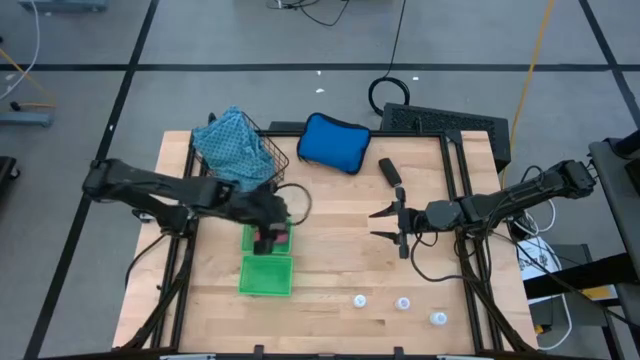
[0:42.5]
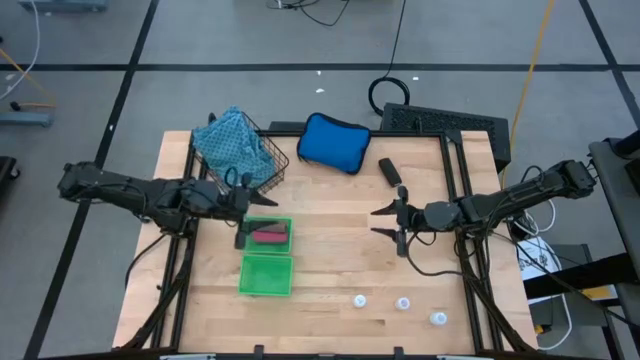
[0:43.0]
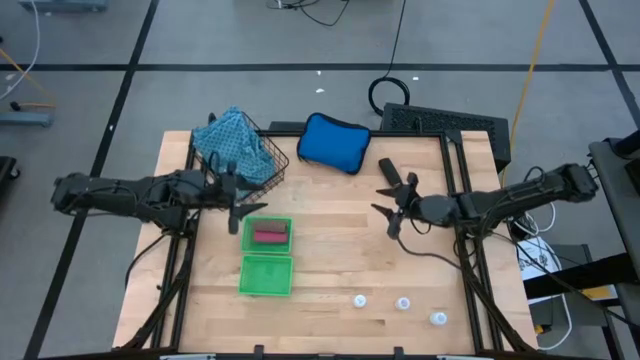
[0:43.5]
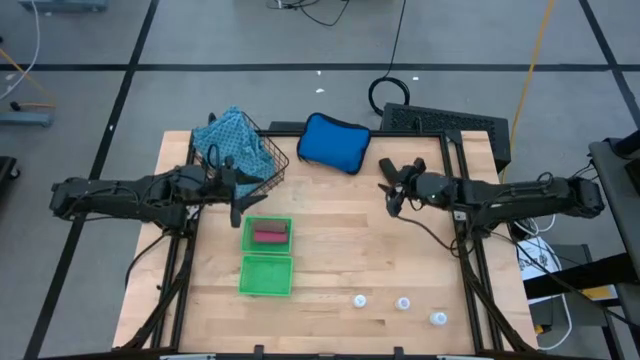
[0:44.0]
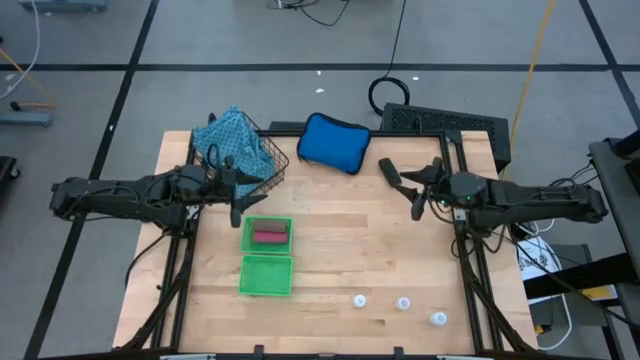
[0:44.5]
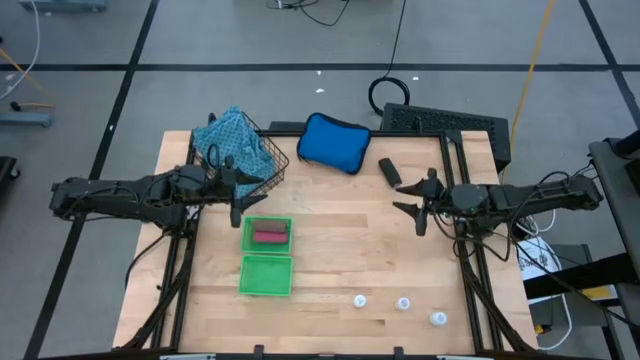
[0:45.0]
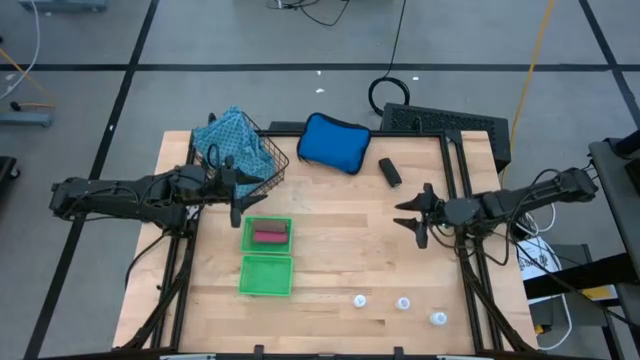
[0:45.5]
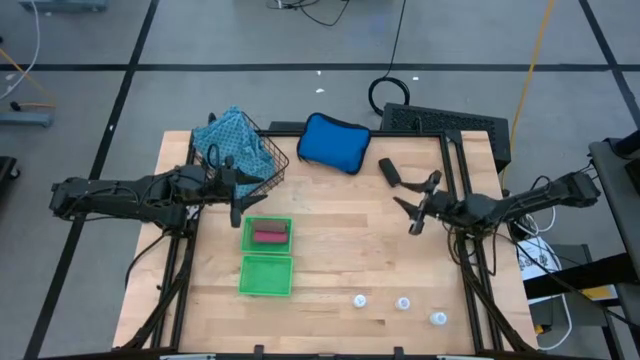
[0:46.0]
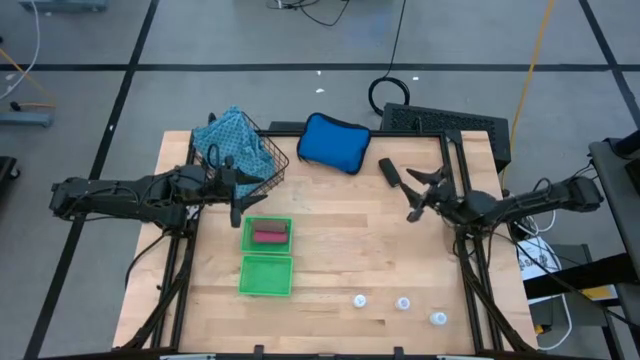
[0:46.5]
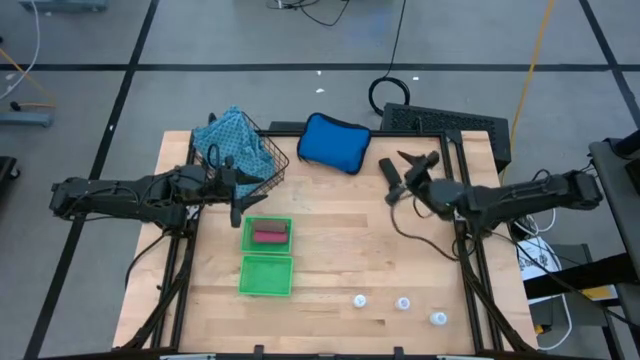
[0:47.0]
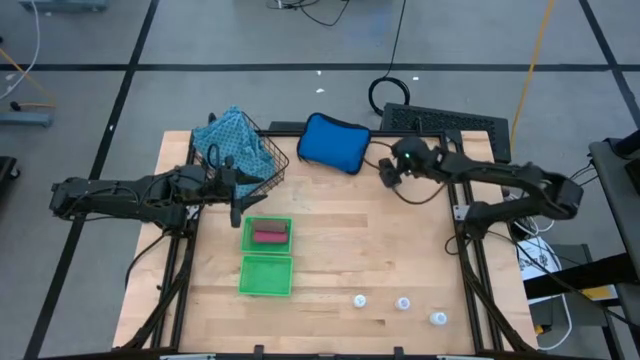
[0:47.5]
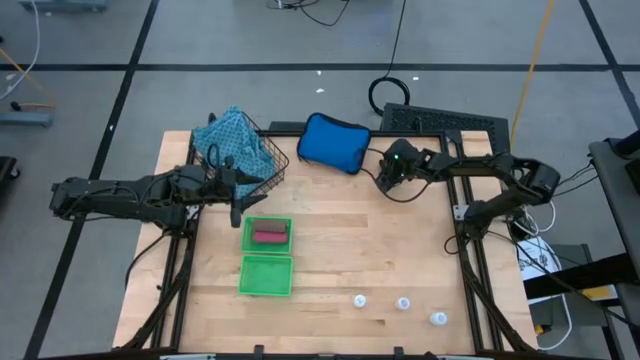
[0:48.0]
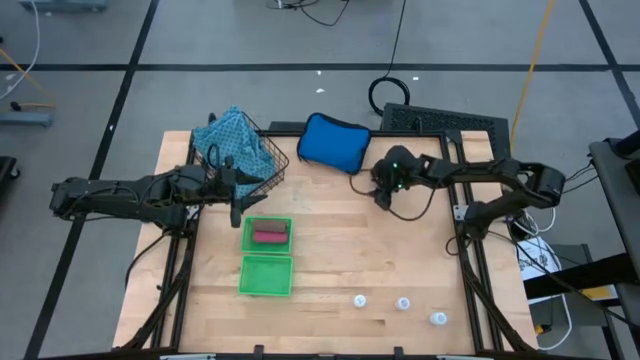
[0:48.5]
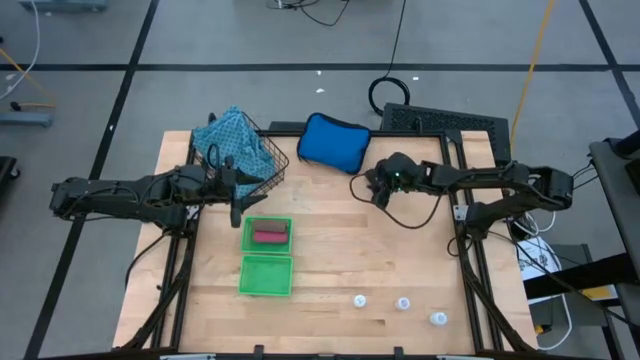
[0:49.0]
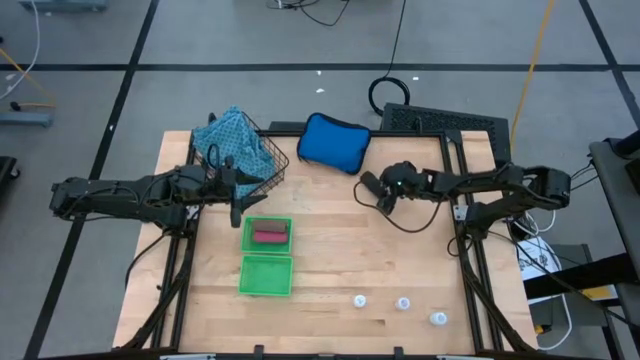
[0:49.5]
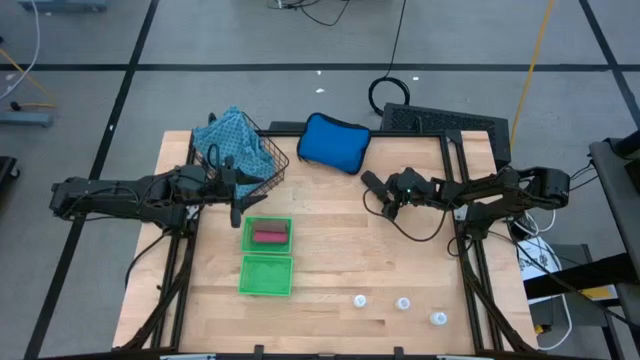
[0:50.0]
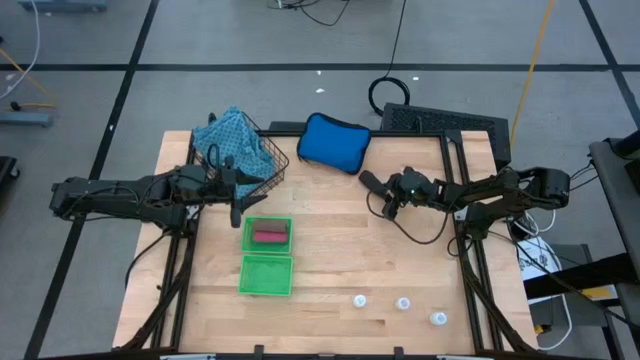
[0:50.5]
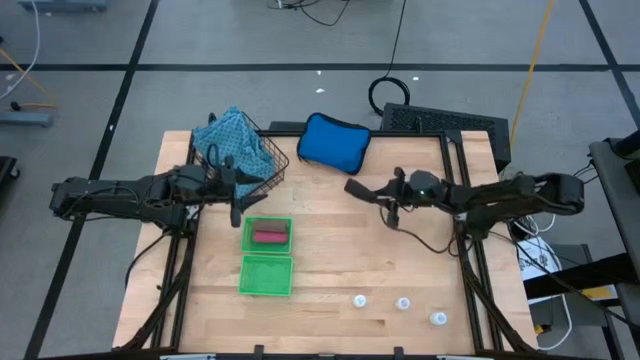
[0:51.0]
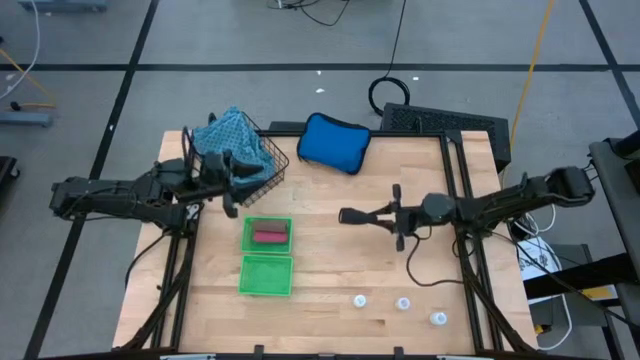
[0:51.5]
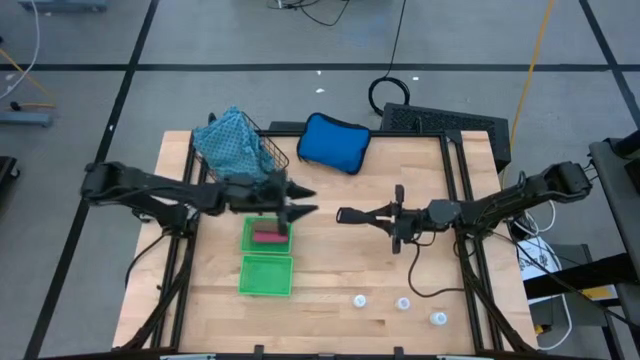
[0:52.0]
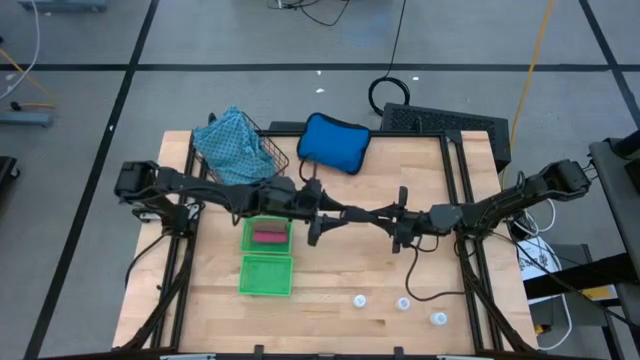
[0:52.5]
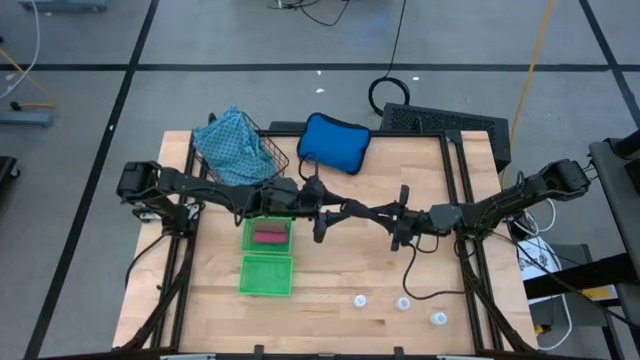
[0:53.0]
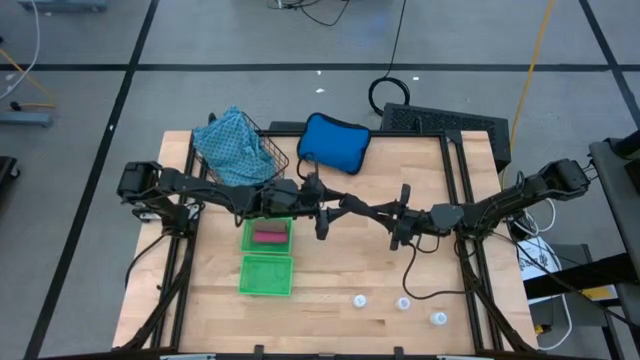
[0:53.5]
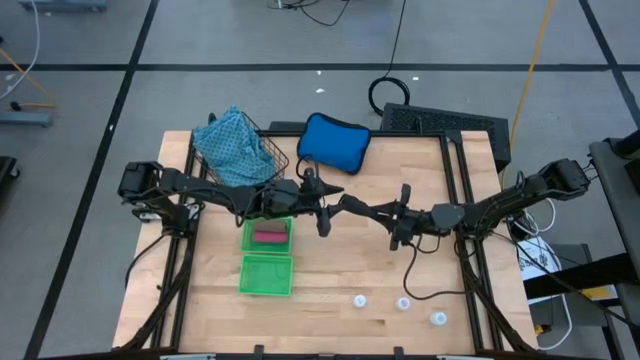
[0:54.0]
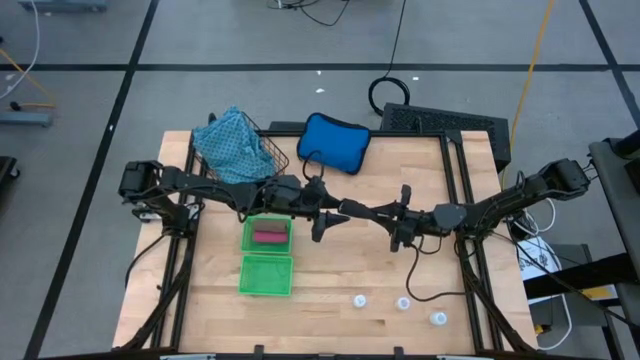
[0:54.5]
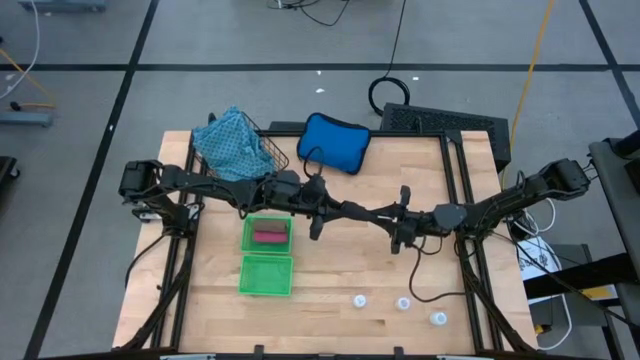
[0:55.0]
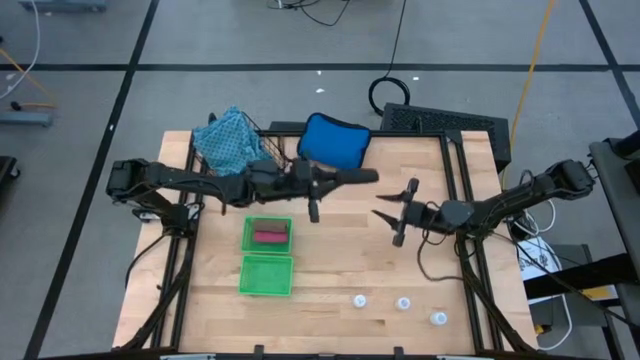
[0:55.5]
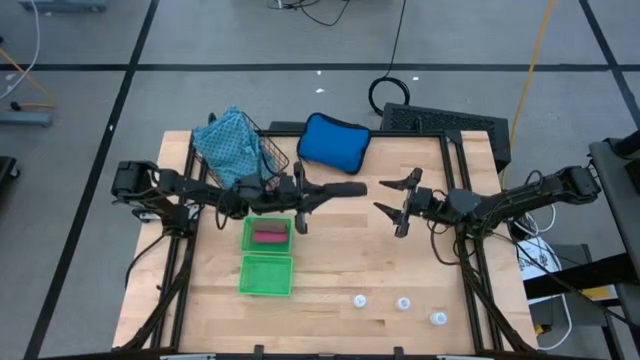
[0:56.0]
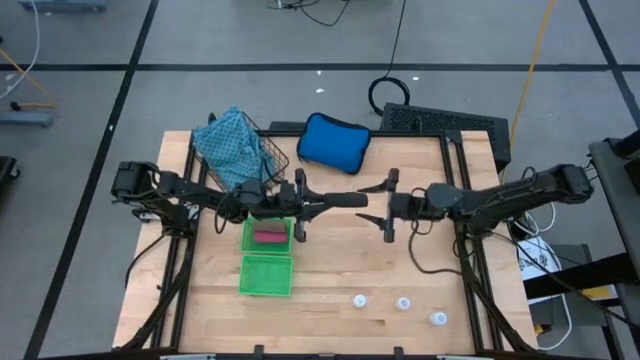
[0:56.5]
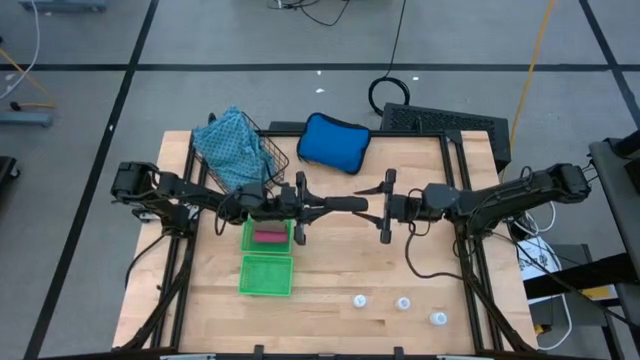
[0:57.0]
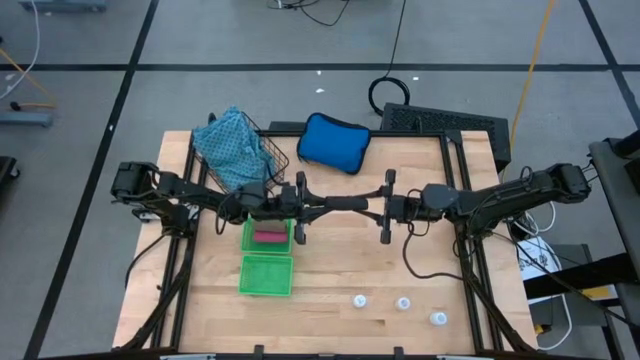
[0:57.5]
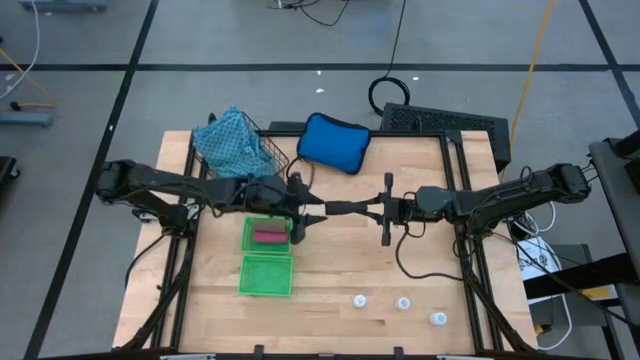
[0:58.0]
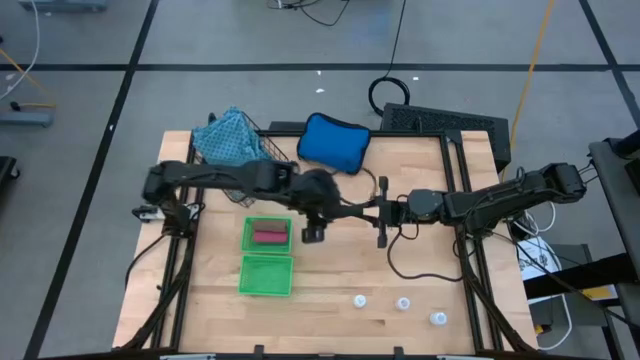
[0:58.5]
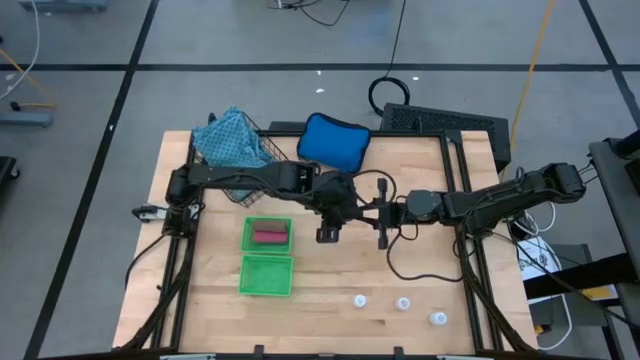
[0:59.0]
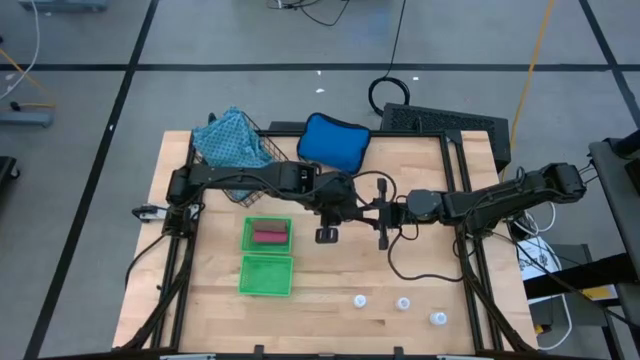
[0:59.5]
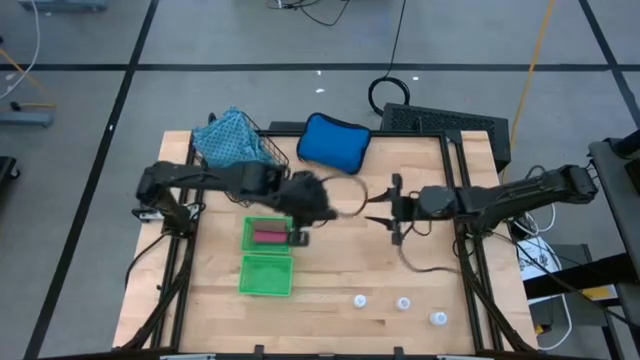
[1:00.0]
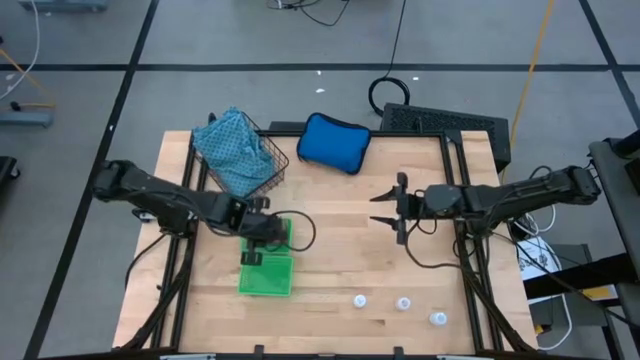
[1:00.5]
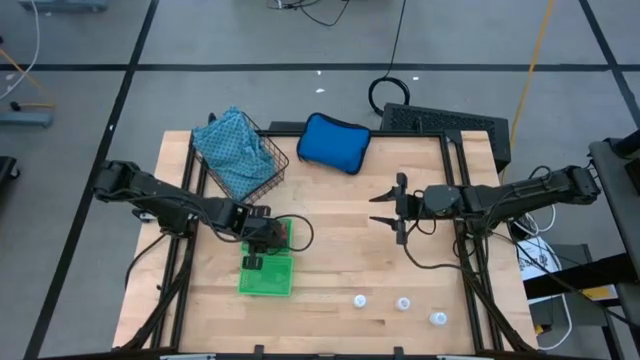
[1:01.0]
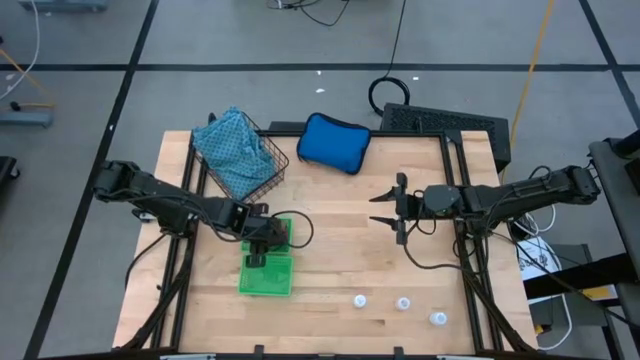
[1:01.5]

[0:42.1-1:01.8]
Task: Pick & Place Medicine items
Put the black bandage into the top green basket

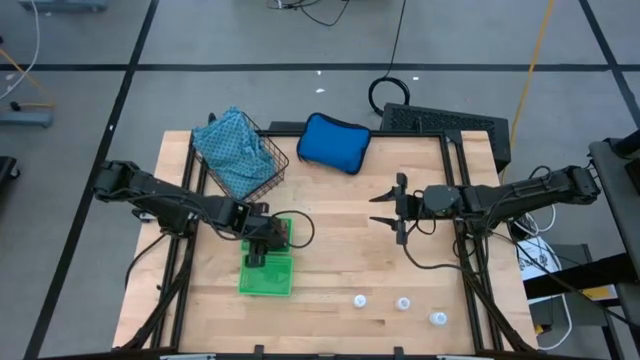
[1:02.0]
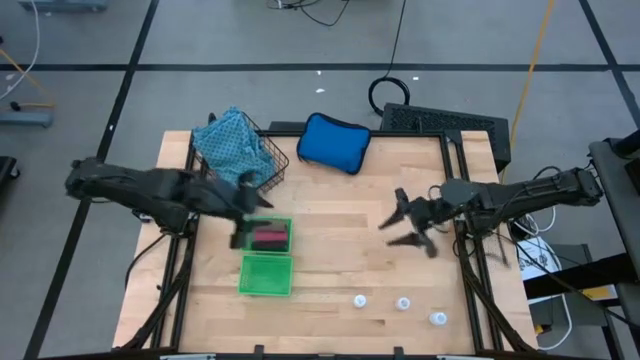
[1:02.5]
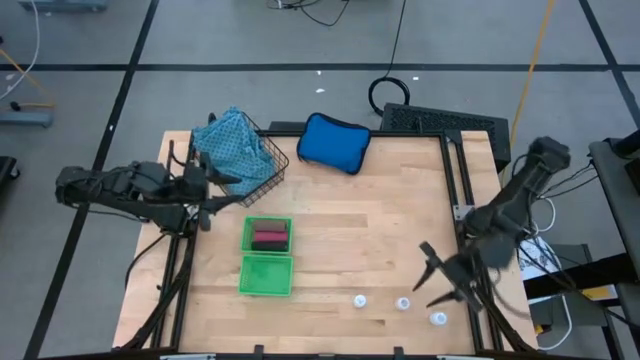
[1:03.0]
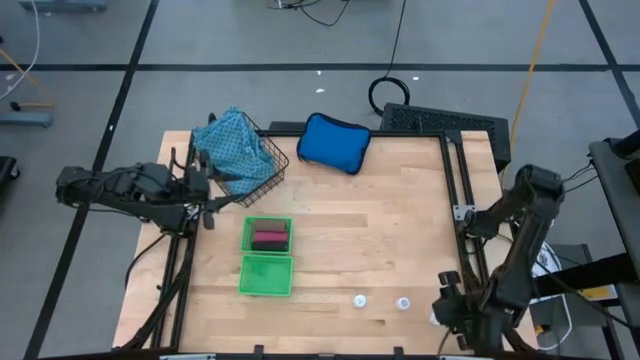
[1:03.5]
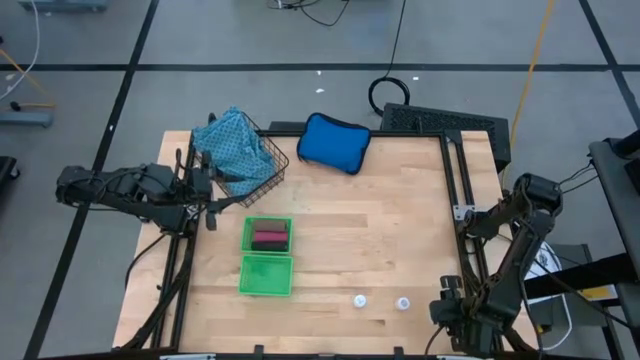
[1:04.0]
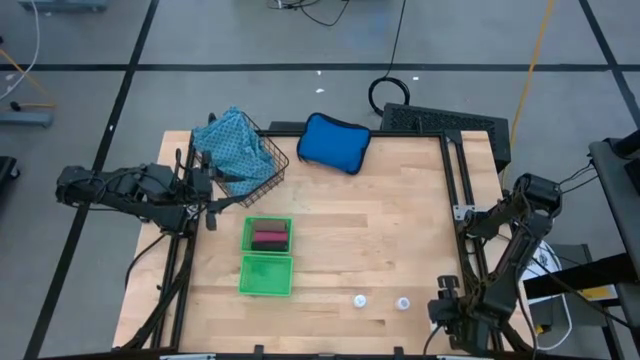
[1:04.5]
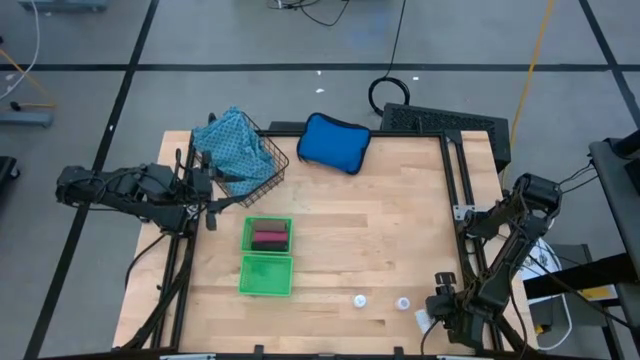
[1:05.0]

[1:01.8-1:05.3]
Put the right white pill bottle into the bottom green basket
